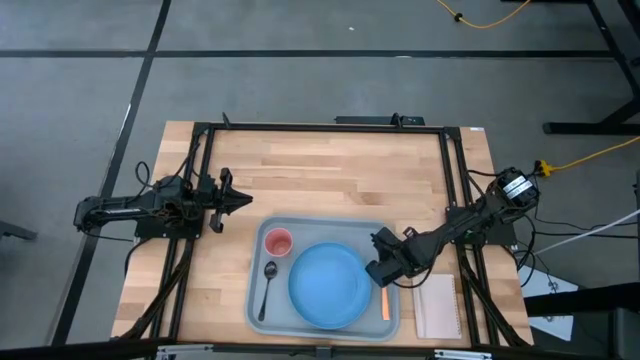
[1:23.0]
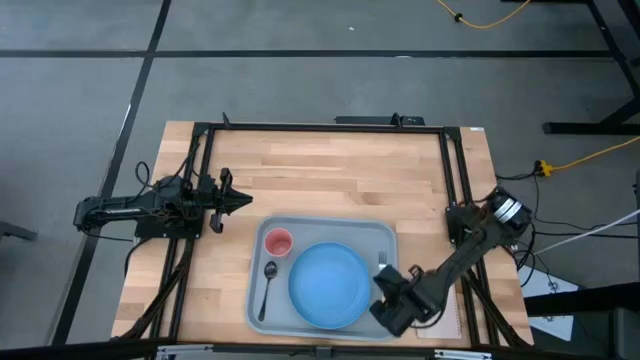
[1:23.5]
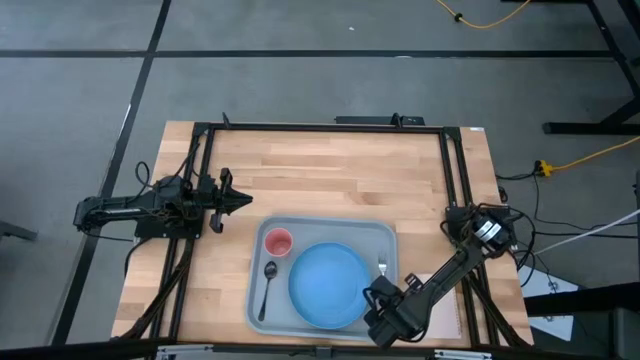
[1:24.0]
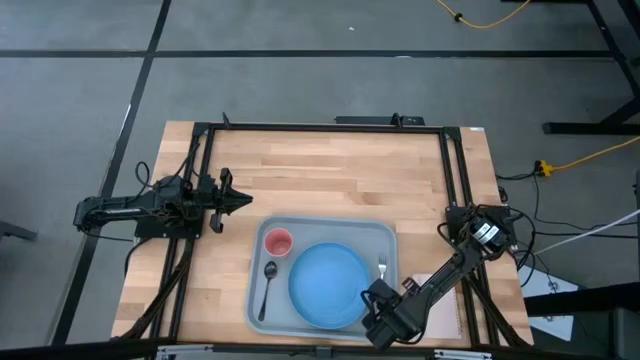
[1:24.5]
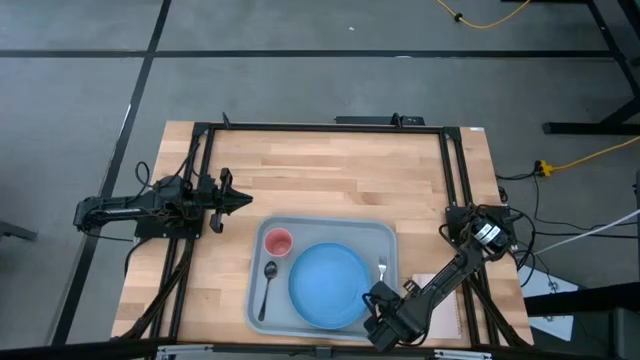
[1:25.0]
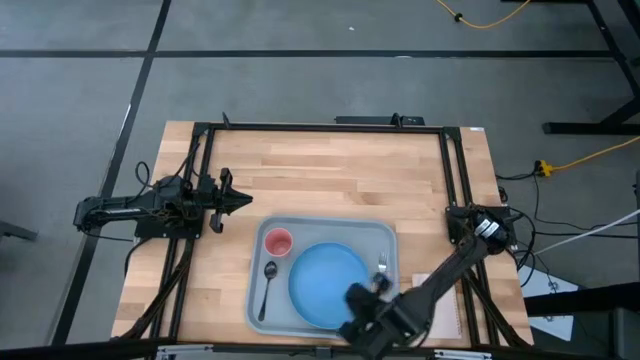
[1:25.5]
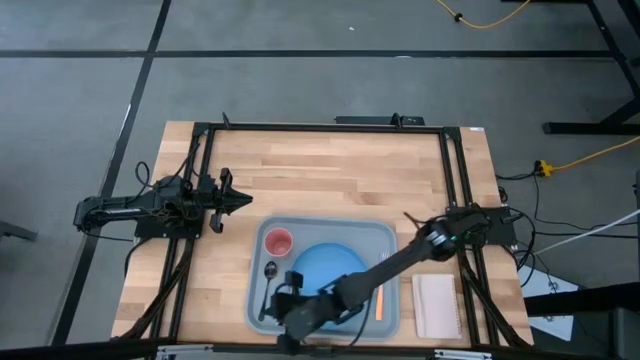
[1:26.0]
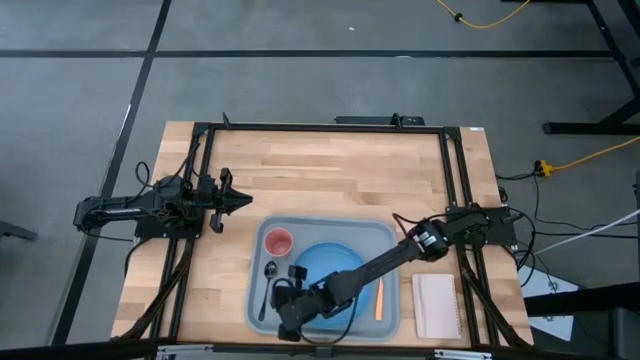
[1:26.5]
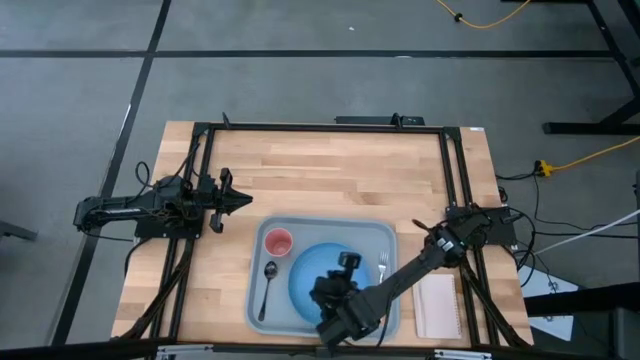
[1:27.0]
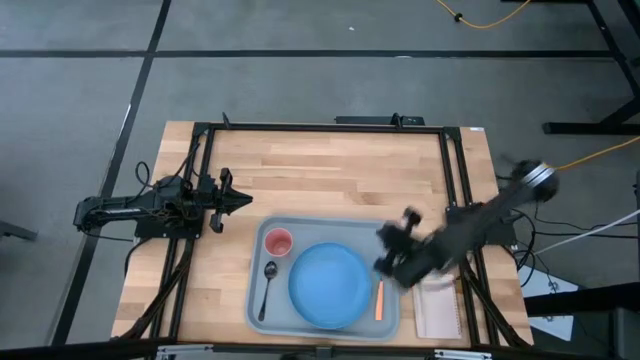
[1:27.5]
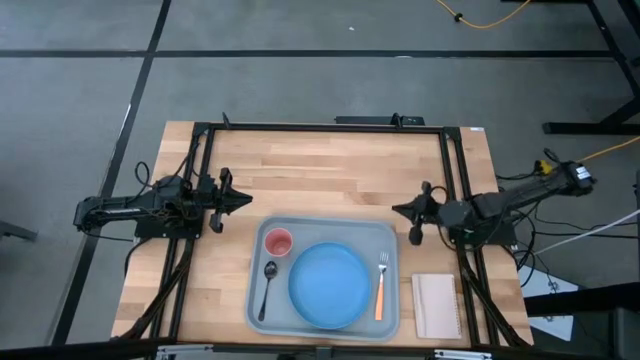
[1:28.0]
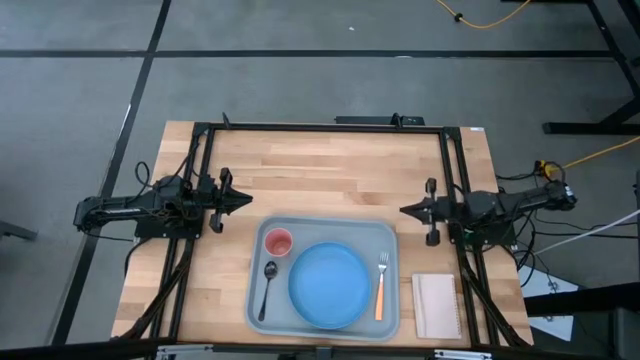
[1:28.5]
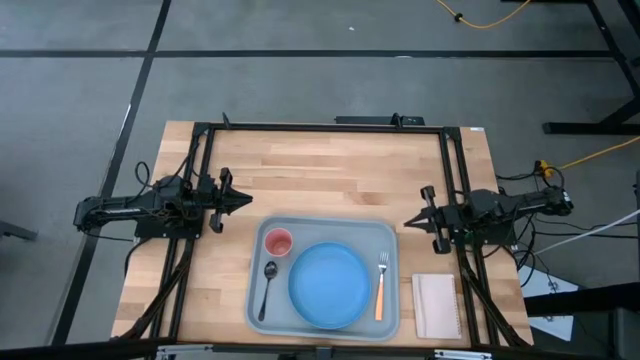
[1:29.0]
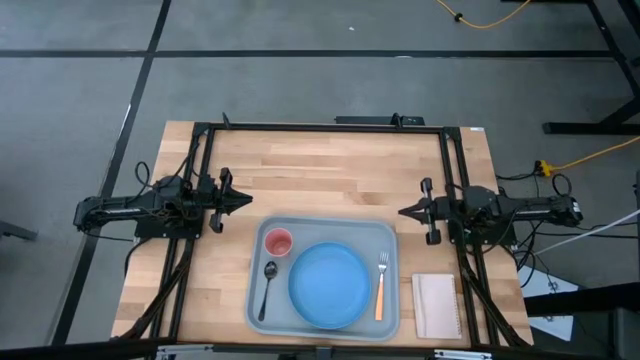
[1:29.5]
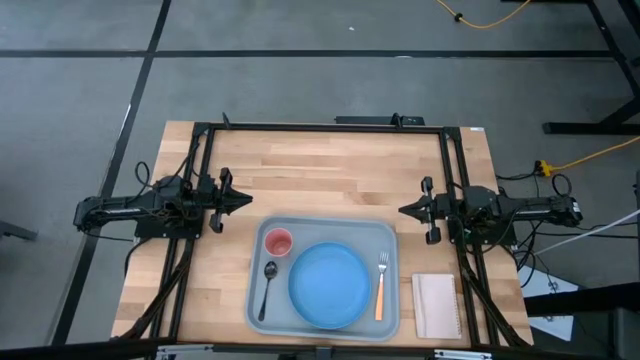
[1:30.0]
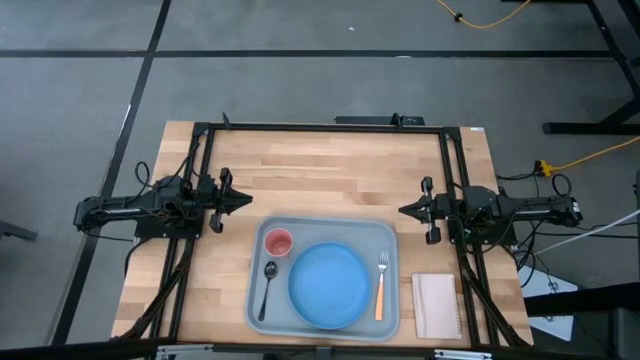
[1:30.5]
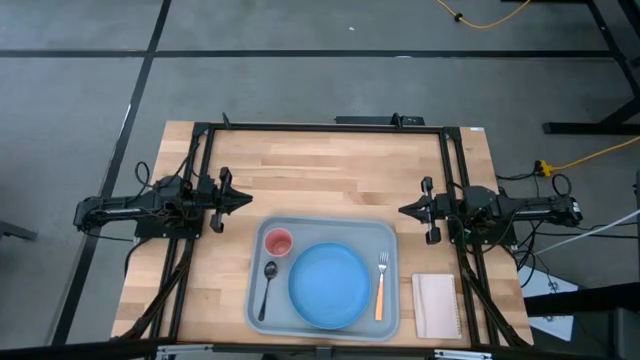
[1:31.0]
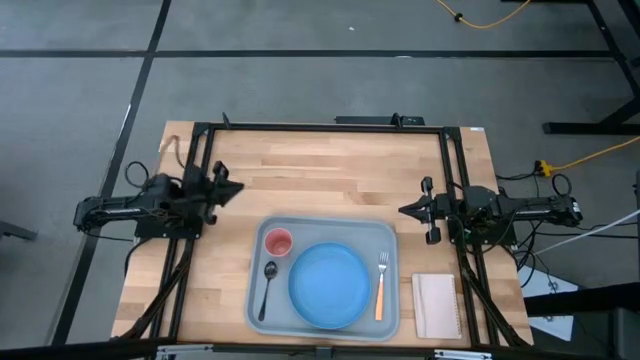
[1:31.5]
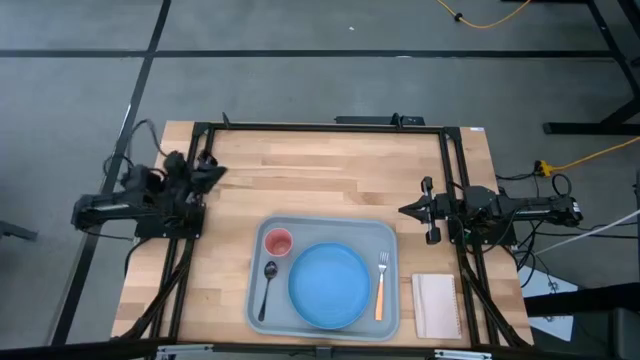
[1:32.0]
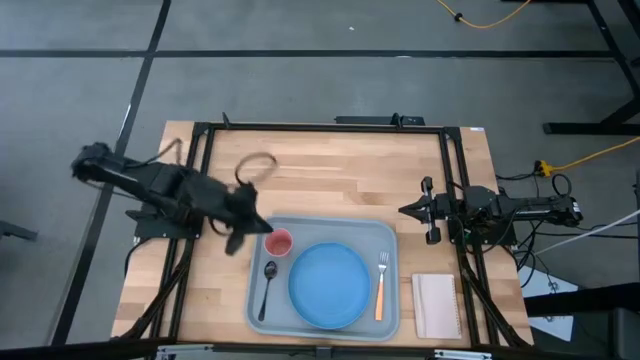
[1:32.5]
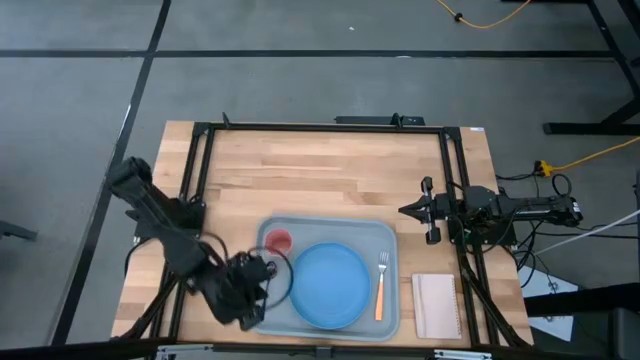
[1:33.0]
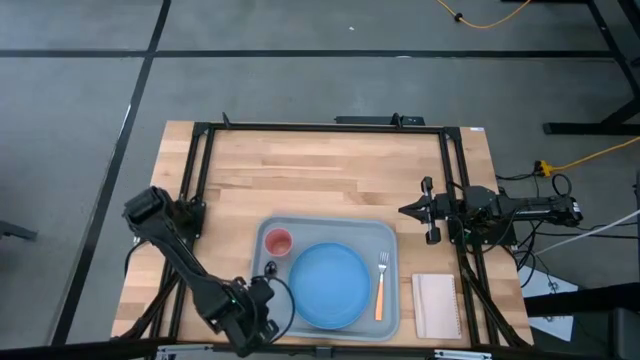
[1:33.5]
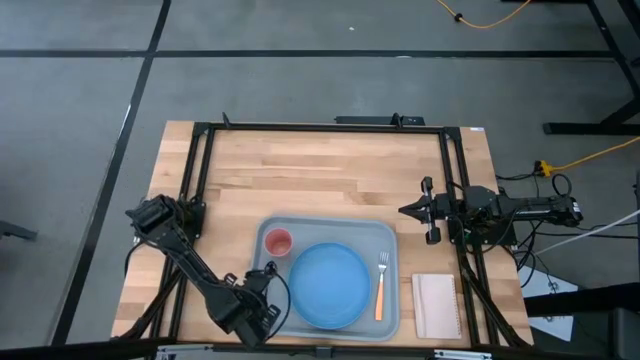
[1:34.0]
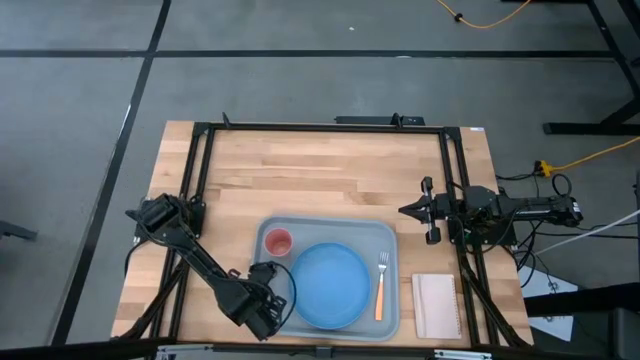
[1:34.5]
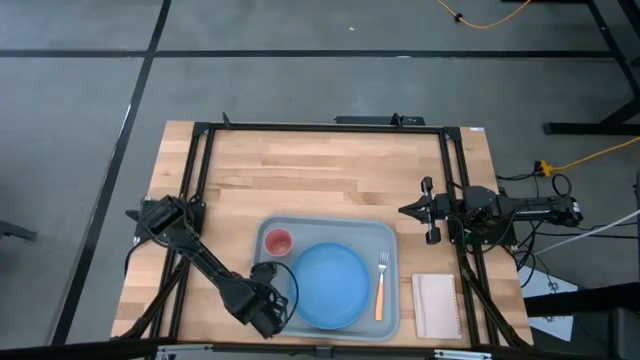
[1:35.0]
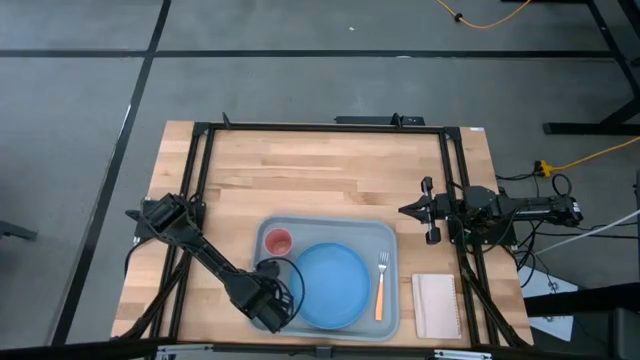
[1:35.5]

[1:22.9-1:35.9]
Task: Pick and place plate/cup/fork/spoon on tray
Adjust the utensils on the gray tray

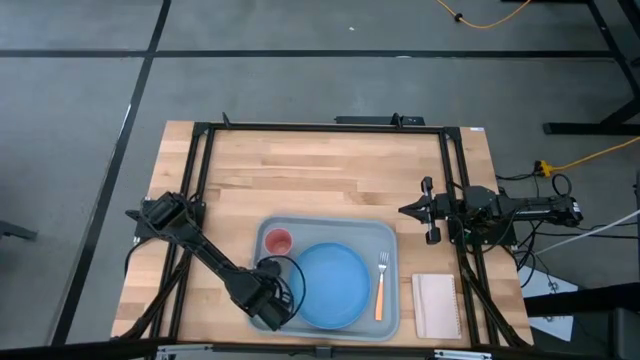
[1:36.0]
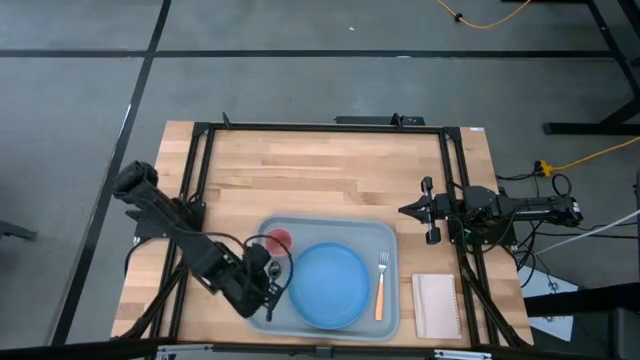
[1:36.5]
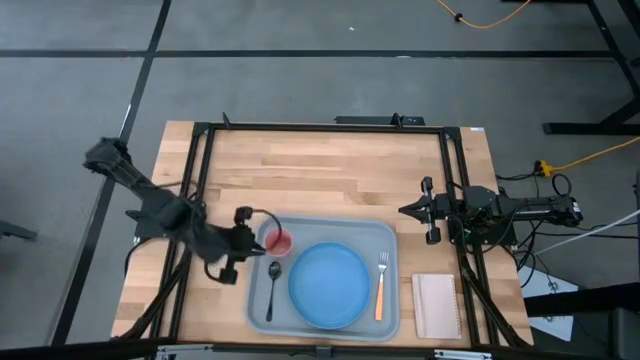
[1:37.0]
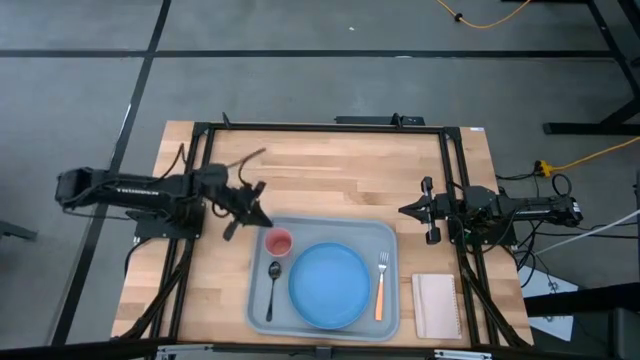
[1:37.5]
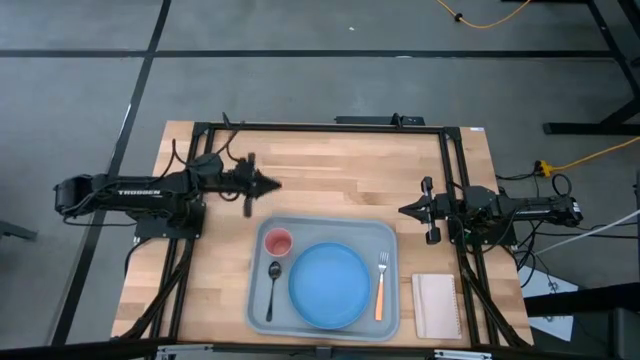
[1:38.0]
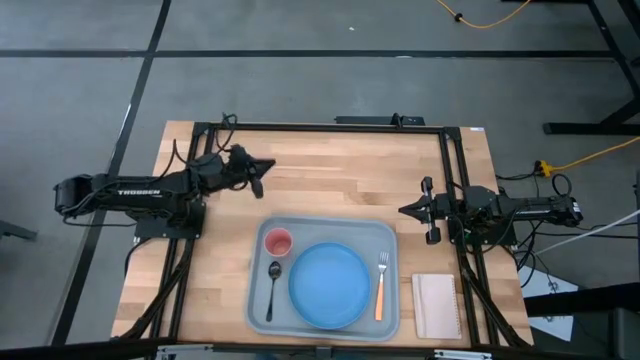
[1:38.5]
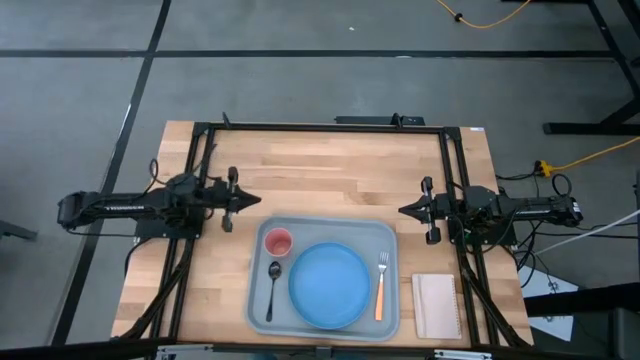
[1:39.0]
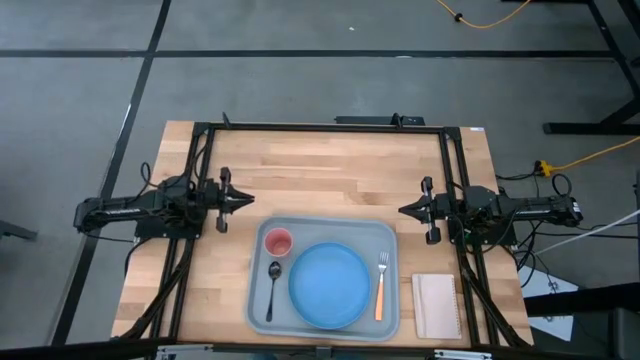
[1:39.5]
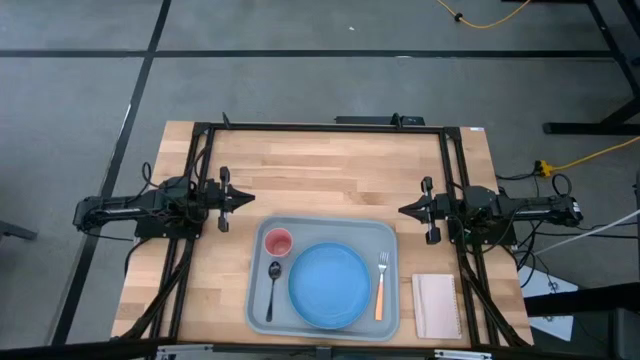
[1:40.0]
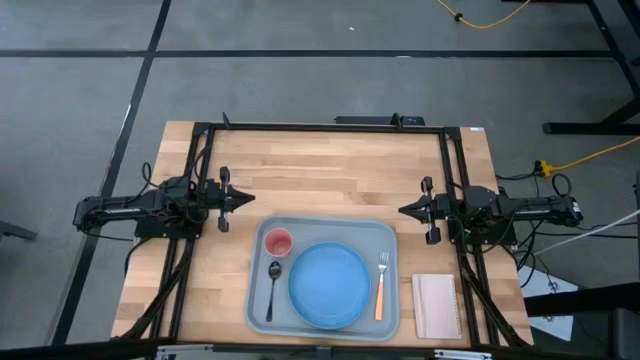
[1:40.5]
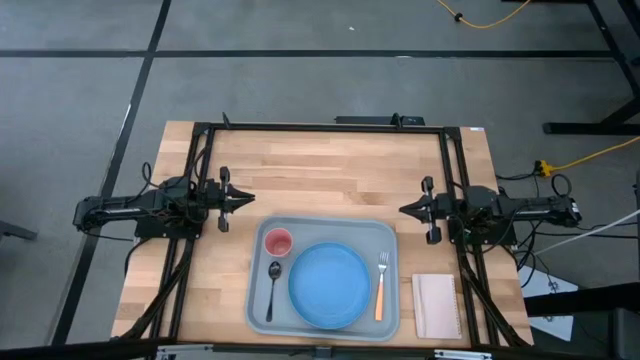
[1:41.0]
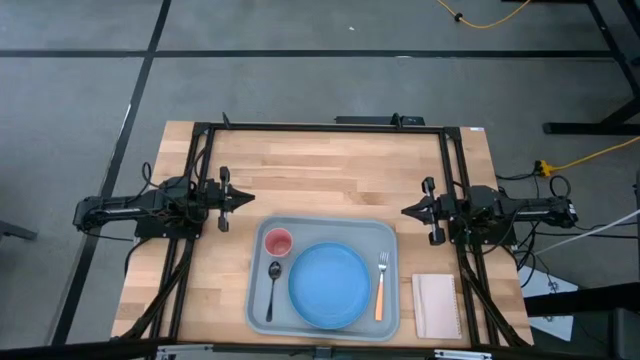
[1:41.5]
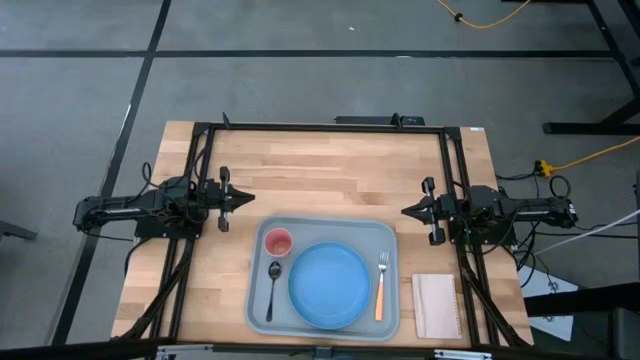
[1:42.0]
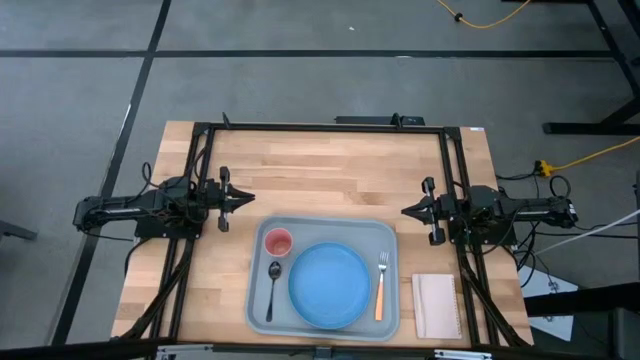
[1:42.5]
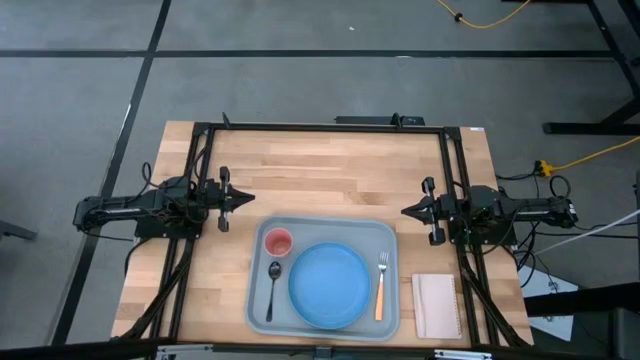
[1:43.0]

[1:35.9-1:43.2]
Return to Home Position

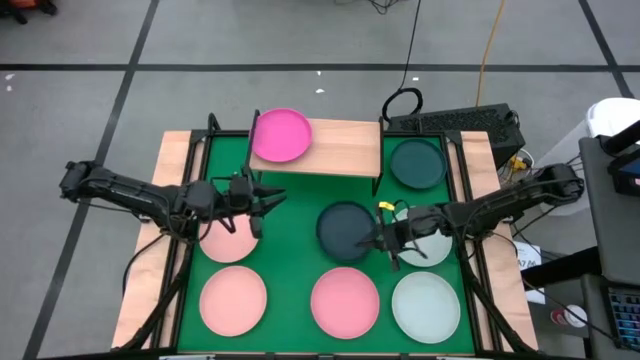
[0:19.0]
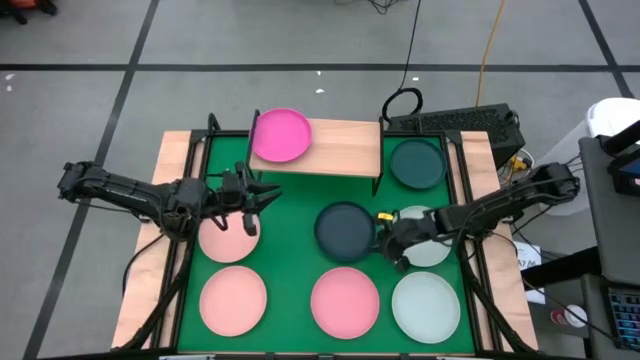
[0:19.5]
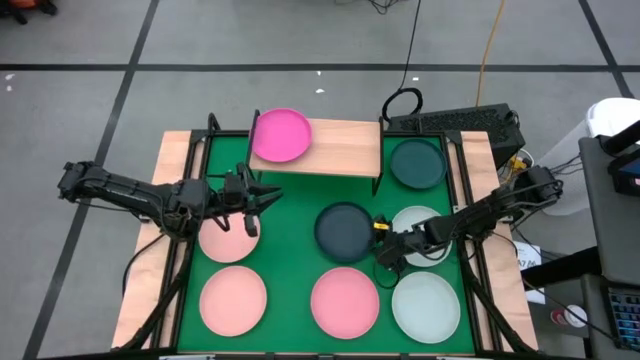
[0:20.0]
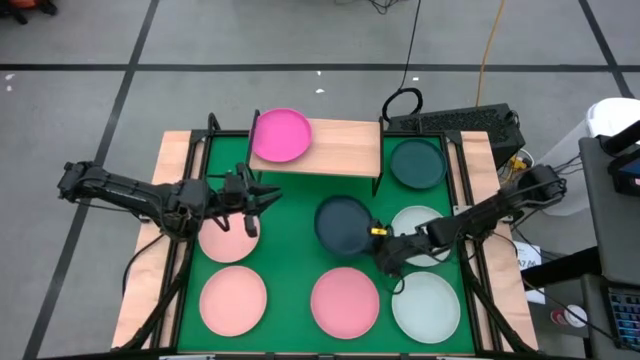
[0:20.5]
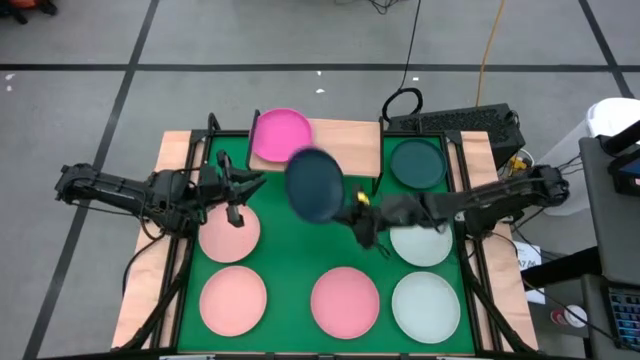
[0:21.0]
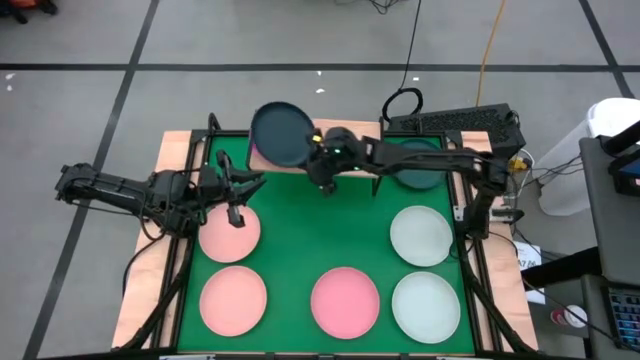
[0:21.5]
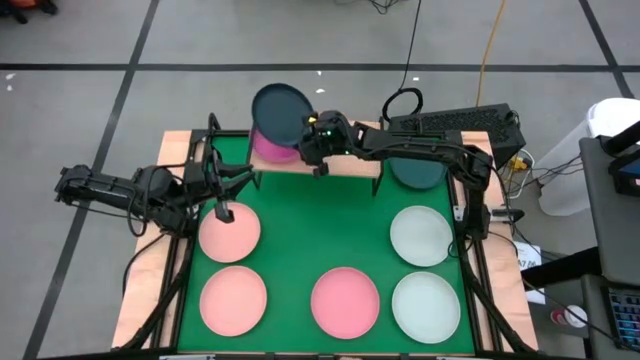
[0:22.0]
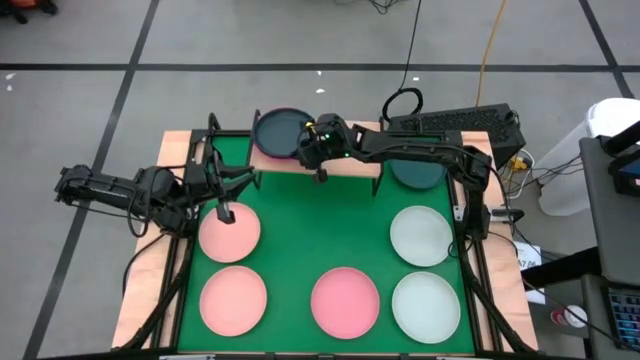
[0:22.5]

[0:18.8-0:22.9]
Task: Place and stack plates onto a shelf
Stack the black plate on top of the pink plate on the shelf
